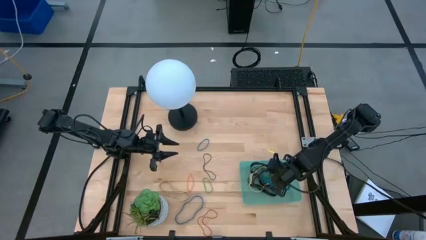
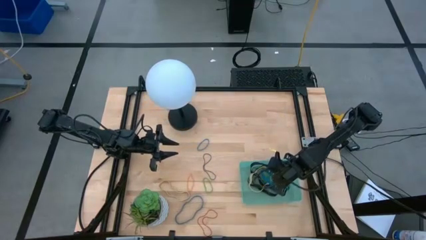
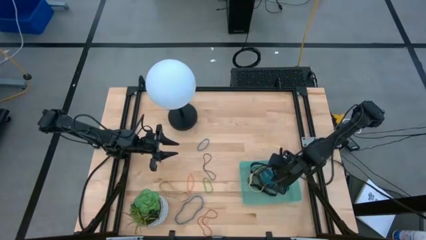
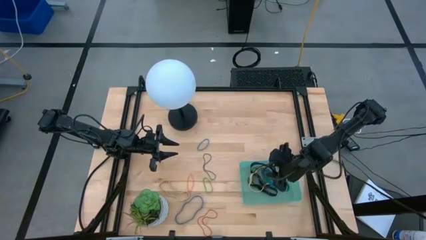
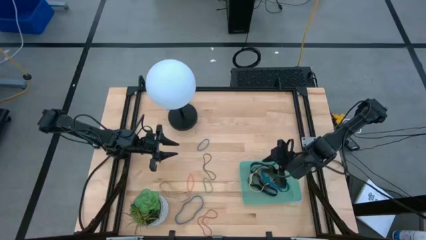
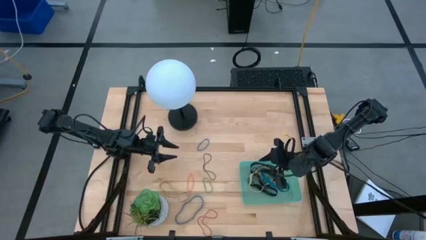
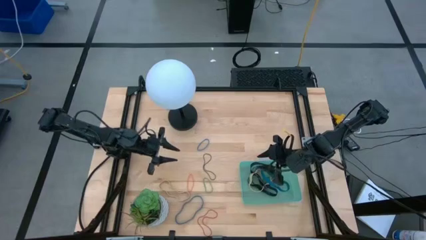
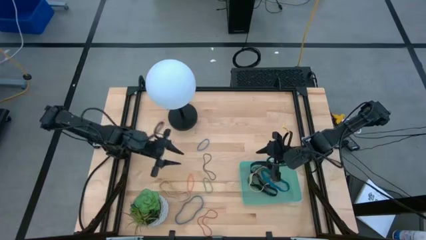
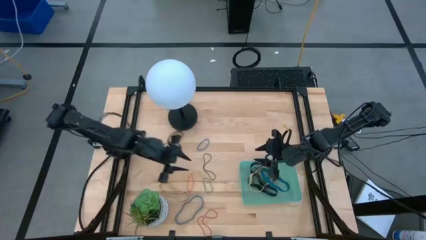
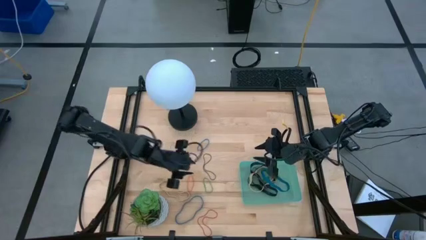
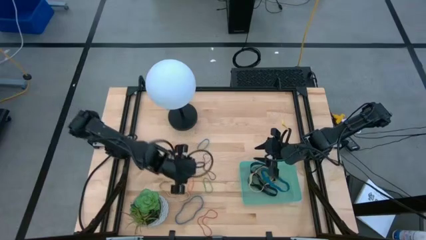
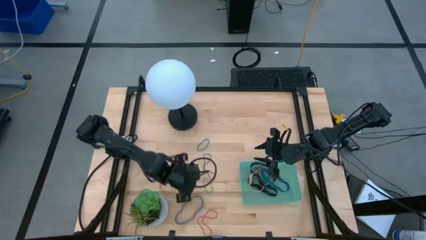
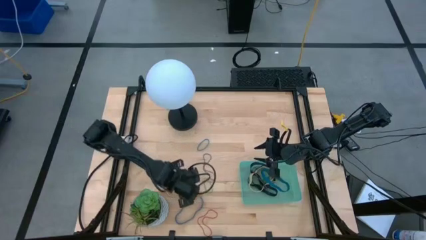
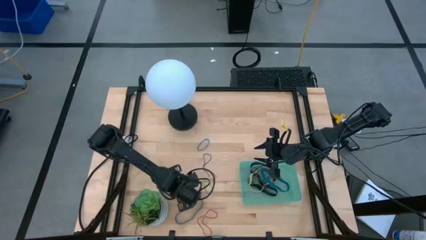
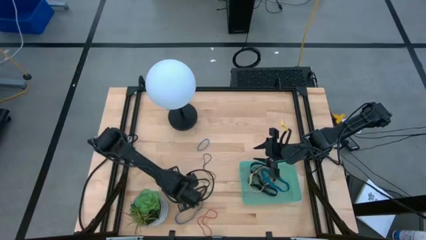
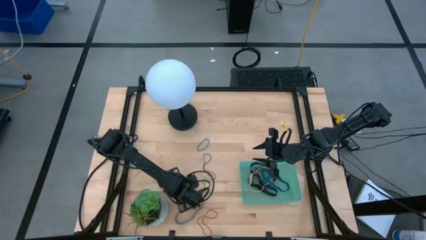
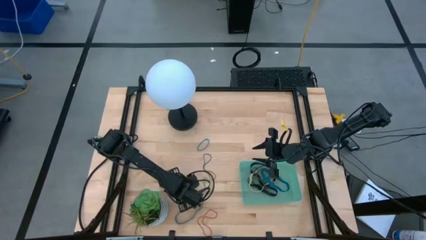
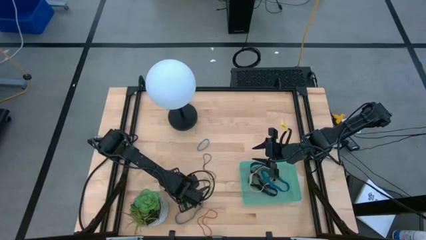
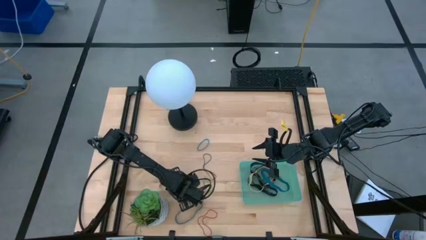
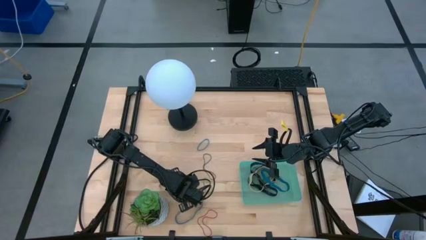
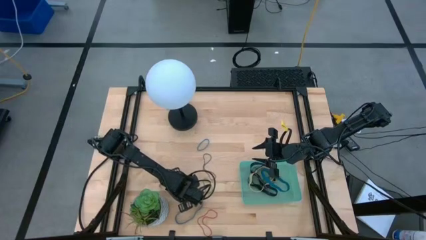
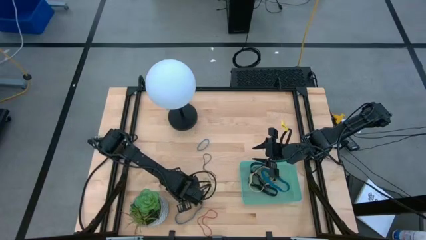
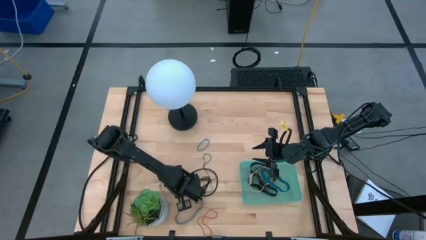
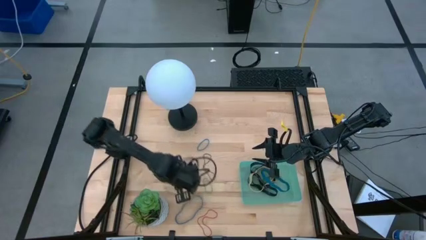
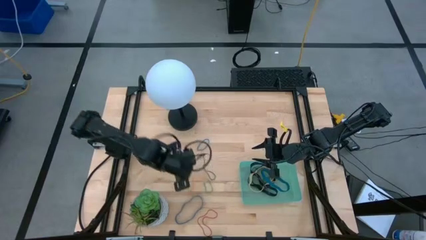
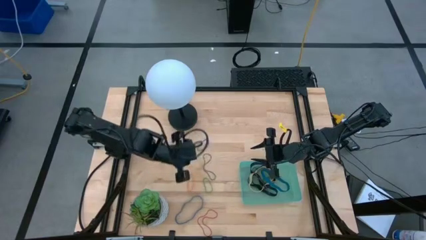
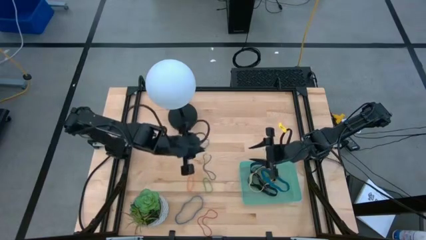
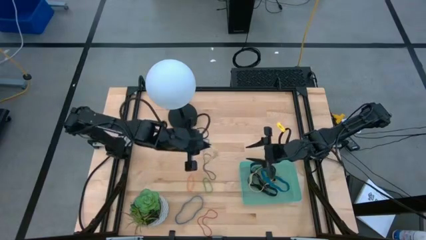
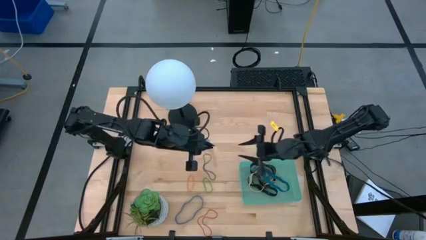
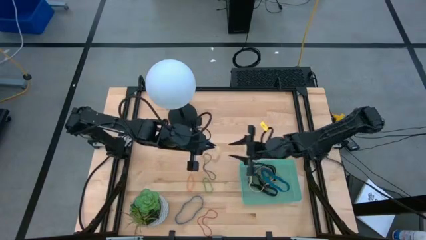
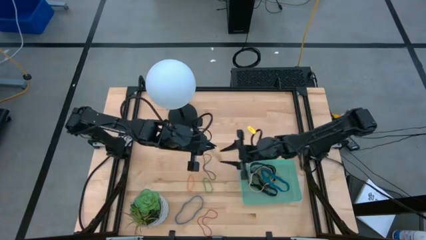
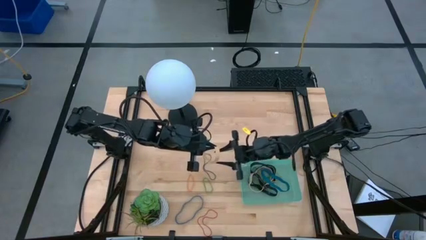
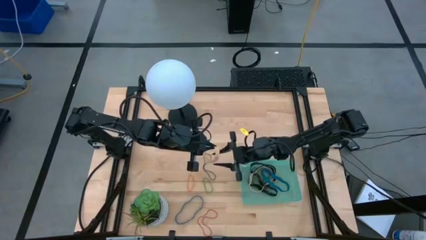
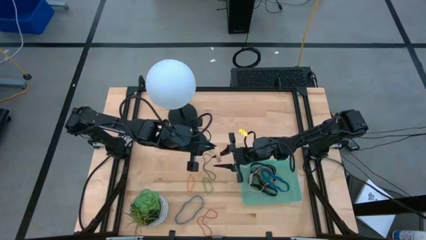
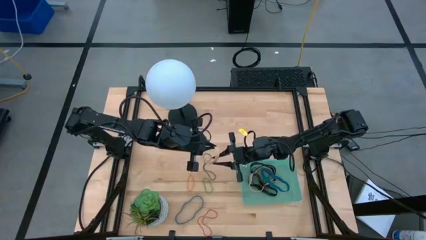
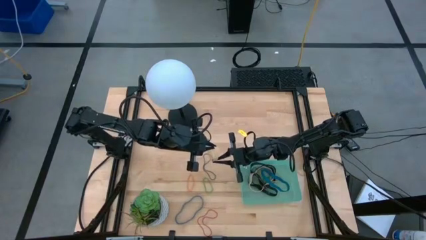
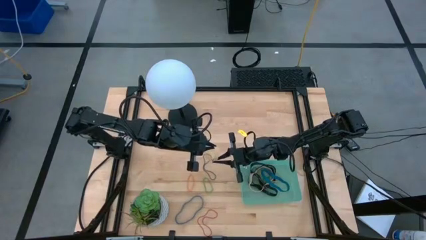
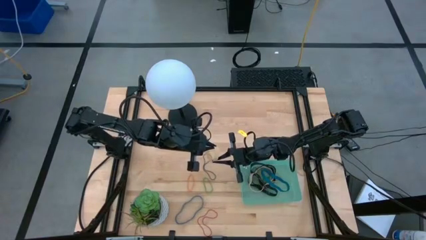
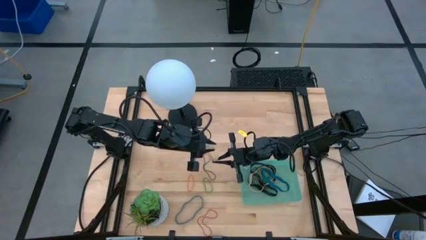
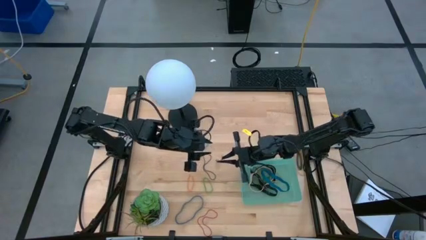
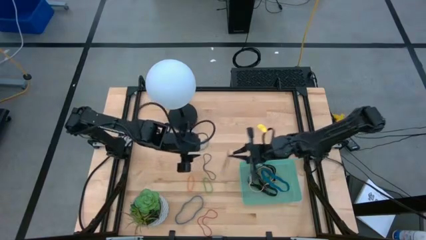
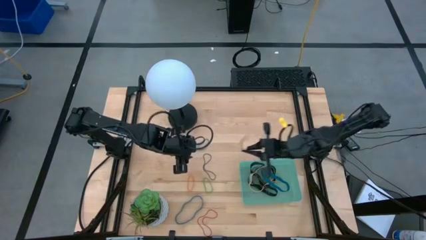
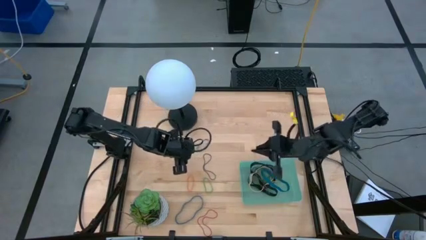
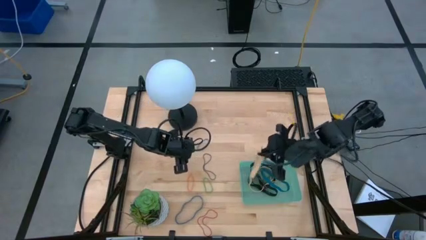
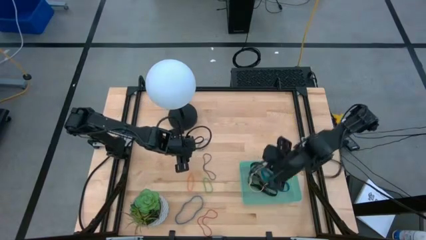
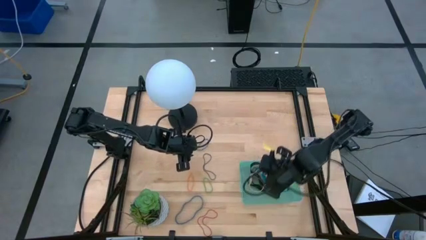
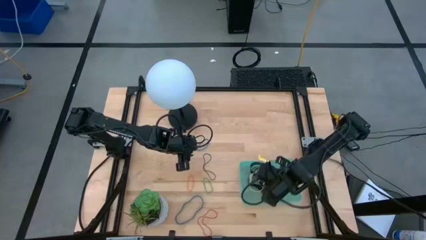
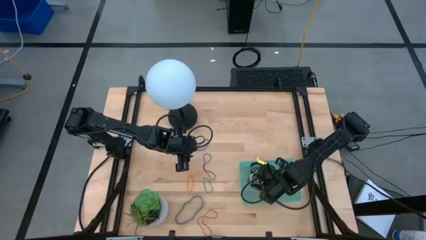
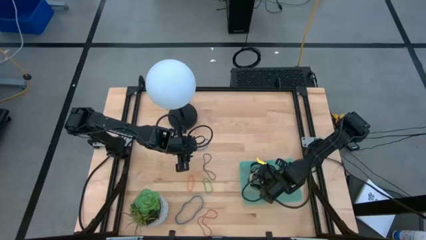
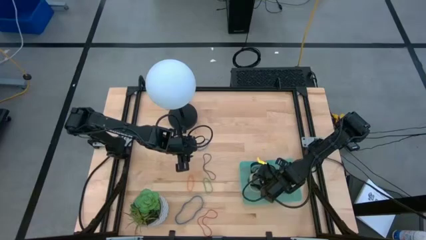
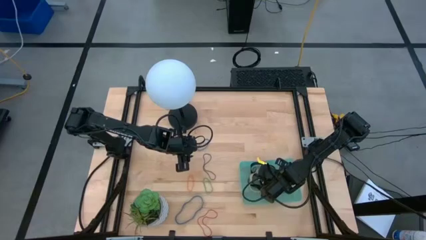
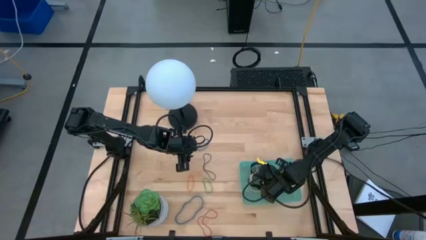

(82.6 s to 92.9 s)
Task: Pick and place rubber bands into bin
Put the brown rubber band into the green bin
